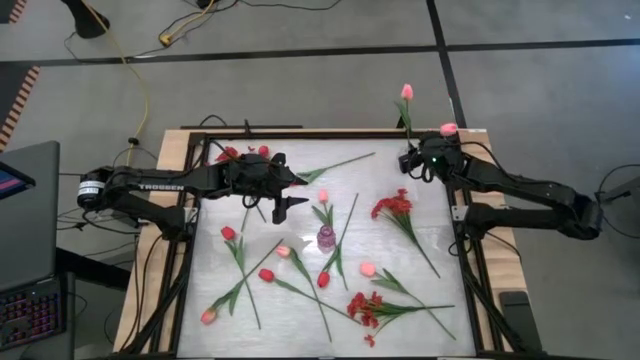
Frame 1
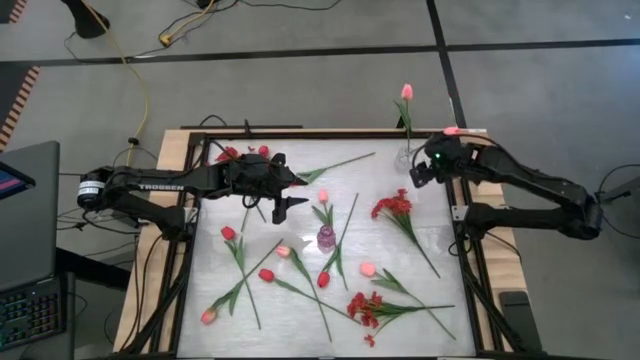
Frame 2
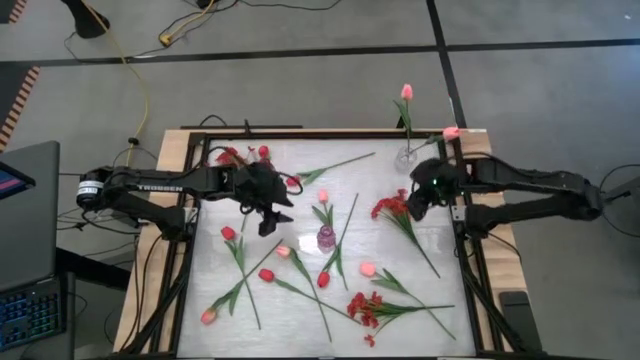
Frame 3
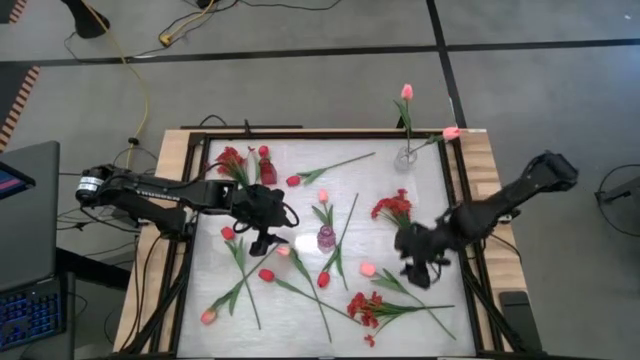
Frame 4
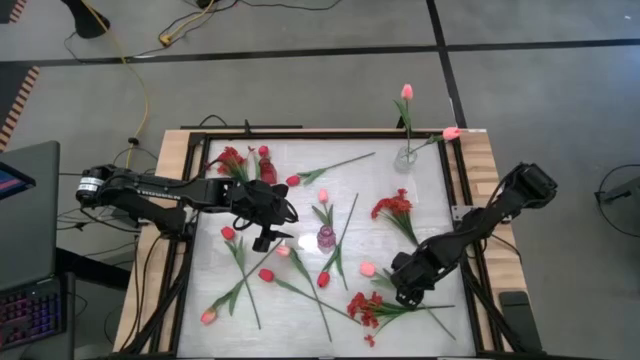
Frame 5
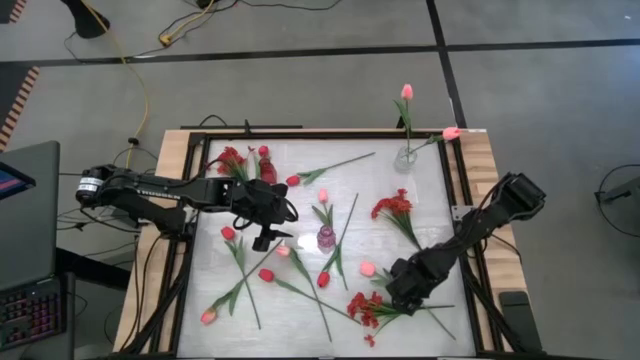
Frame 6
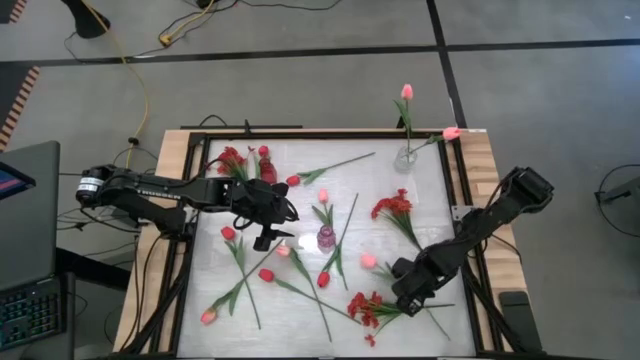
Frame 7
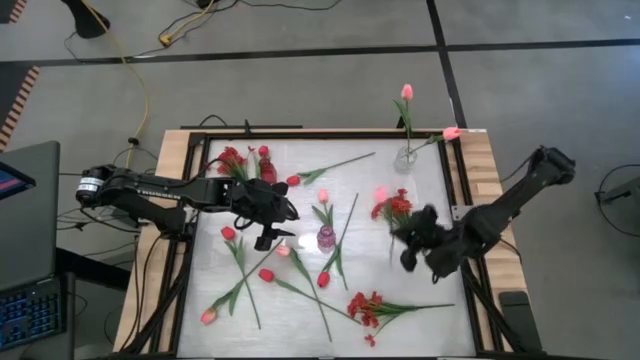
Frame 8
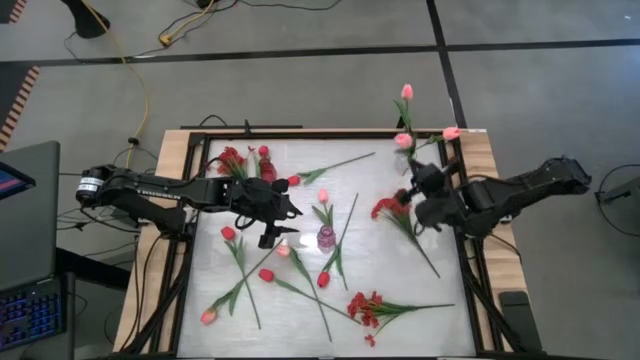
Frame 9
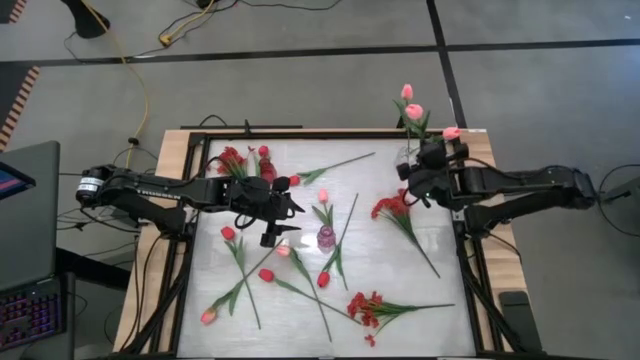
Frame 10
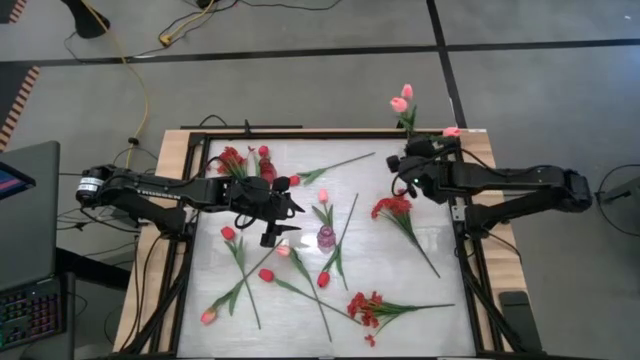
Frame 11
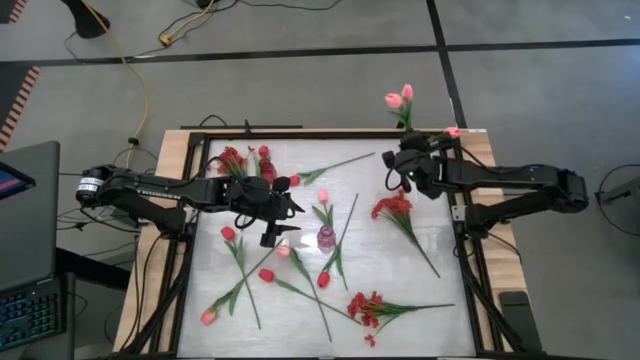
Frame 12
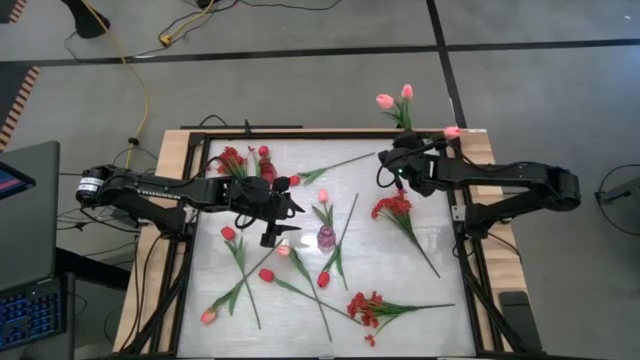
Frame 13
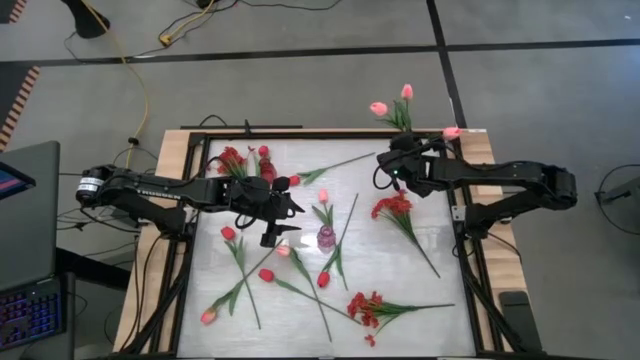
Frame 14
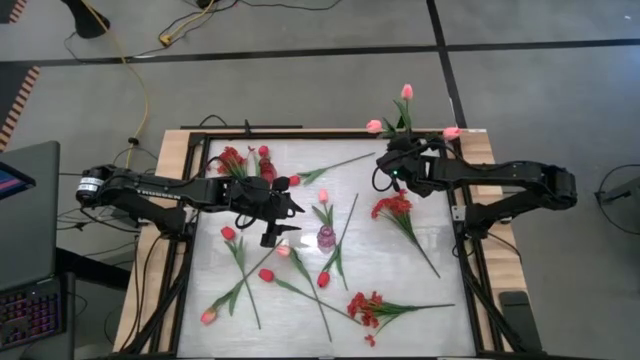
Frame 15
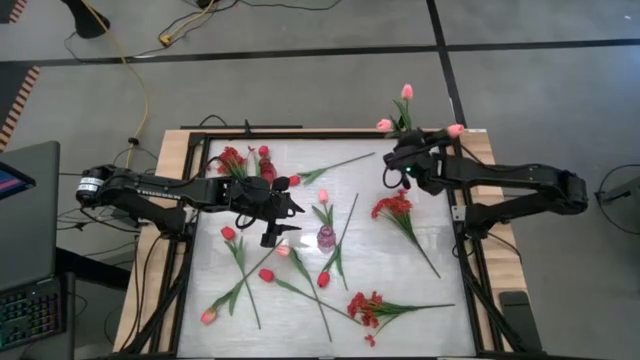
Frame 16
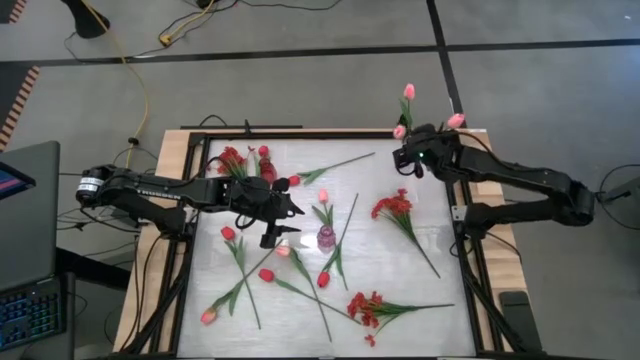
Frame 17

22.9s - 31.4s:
Task: Sort flowers into vase by color
Put the pink flower into the transparent vase

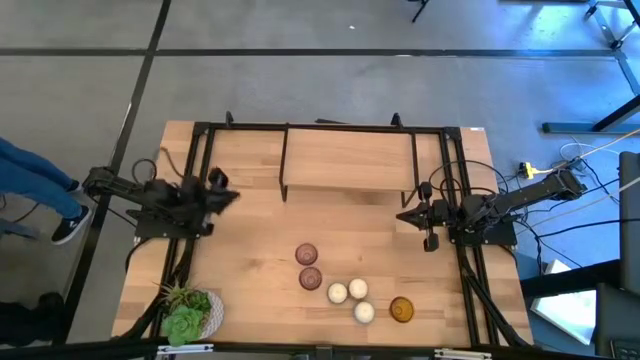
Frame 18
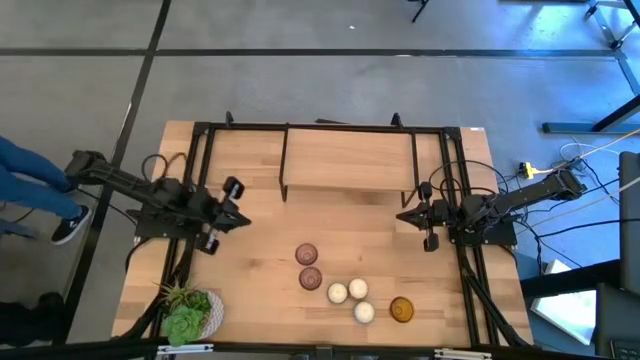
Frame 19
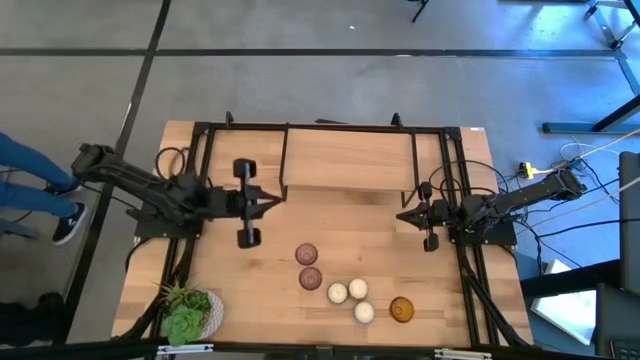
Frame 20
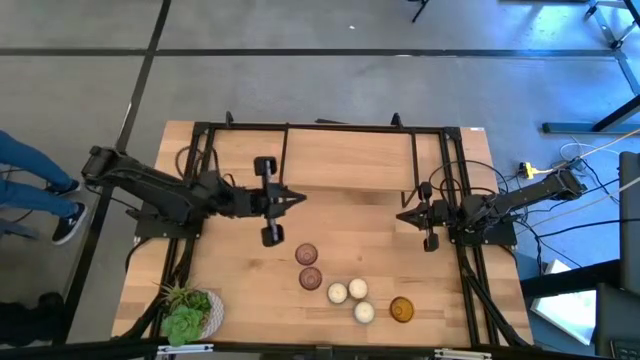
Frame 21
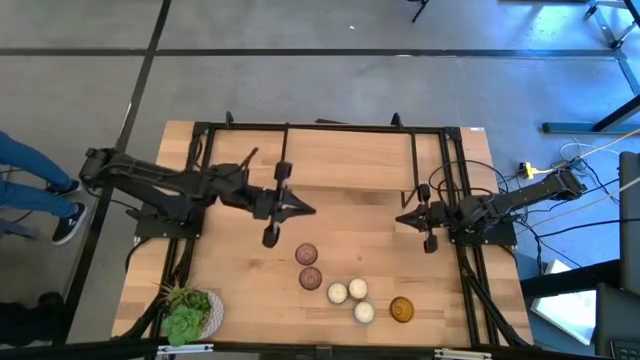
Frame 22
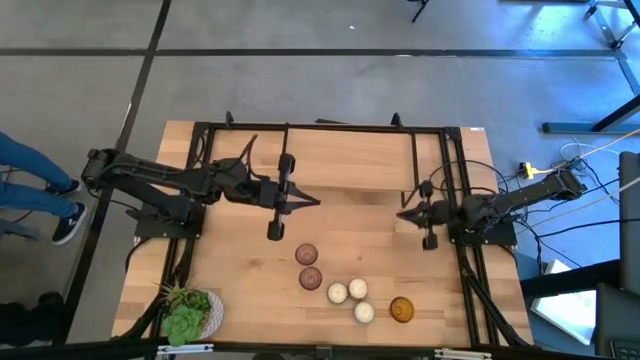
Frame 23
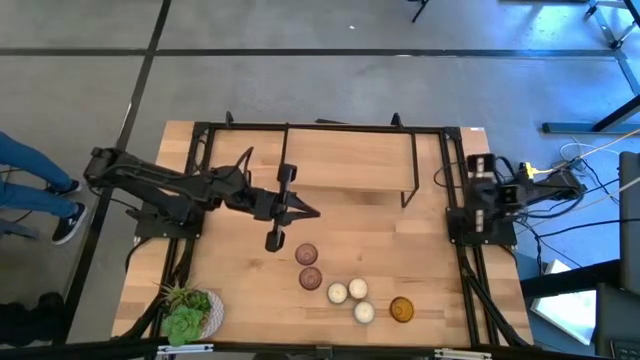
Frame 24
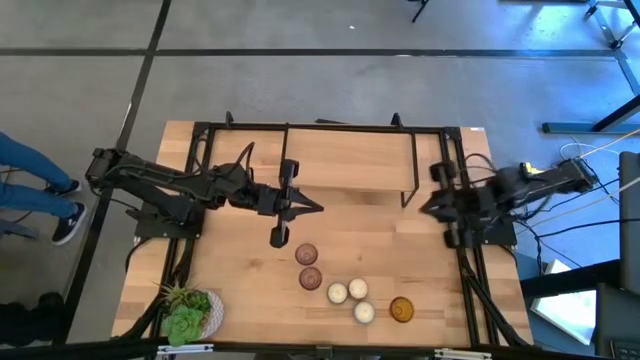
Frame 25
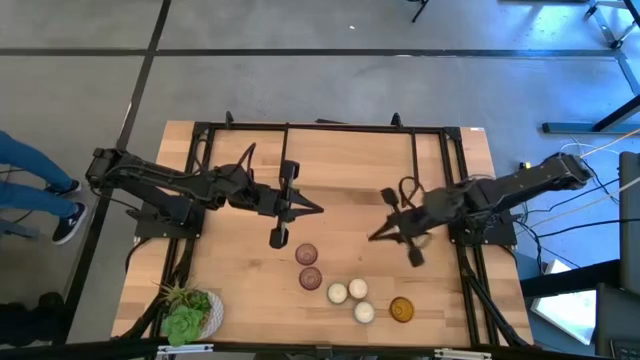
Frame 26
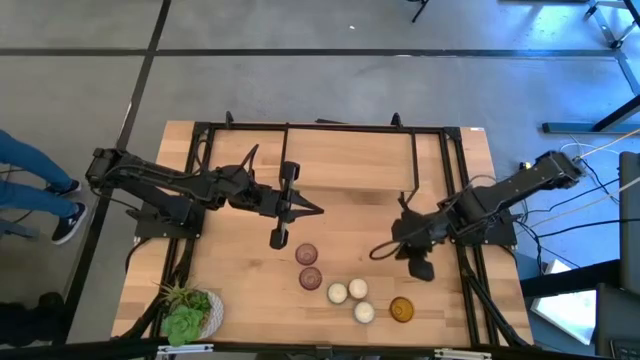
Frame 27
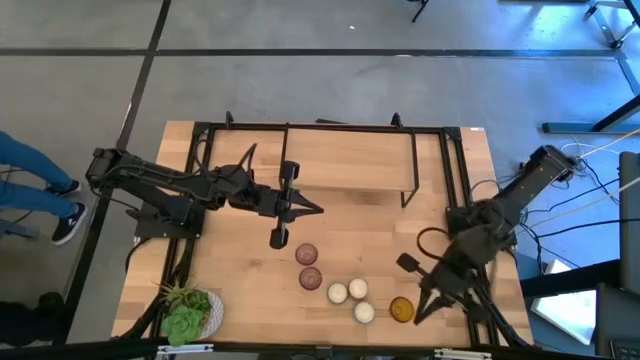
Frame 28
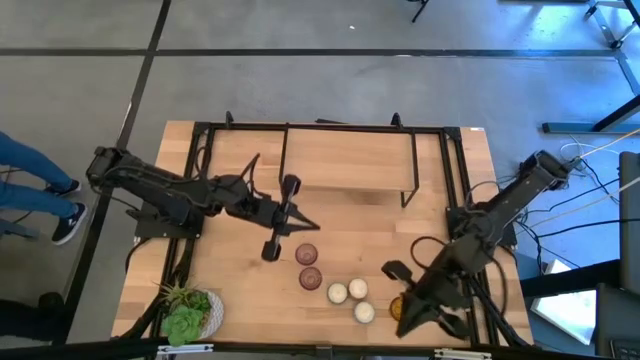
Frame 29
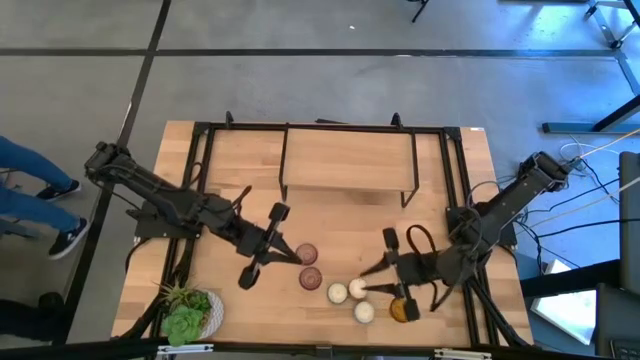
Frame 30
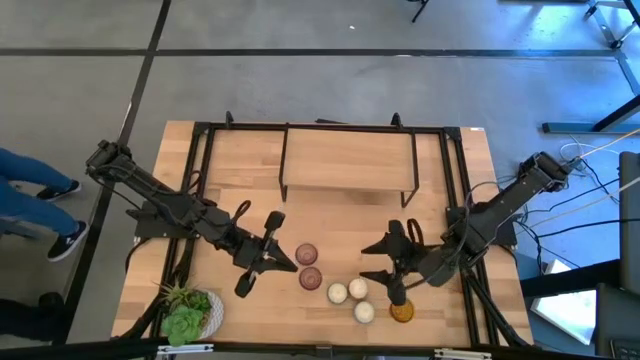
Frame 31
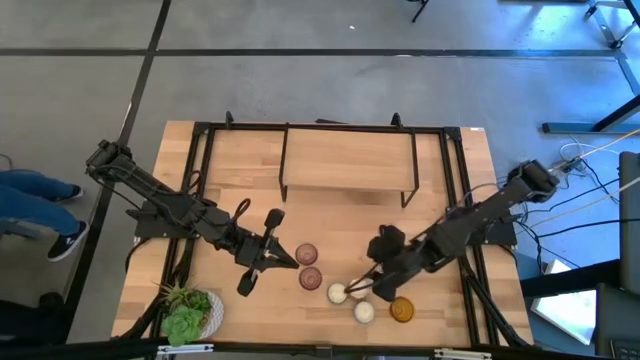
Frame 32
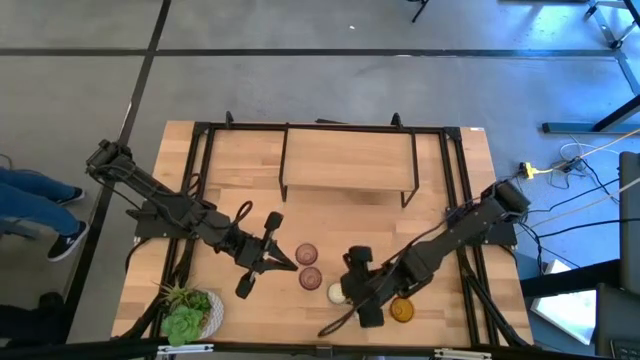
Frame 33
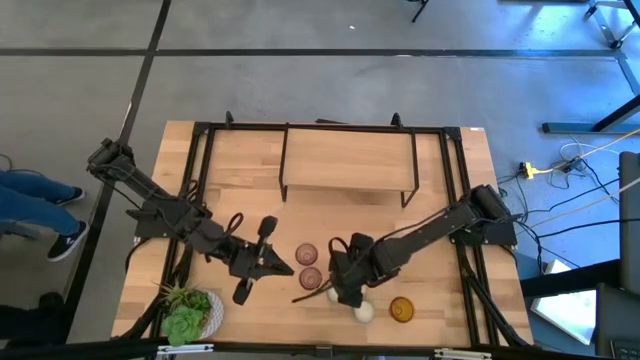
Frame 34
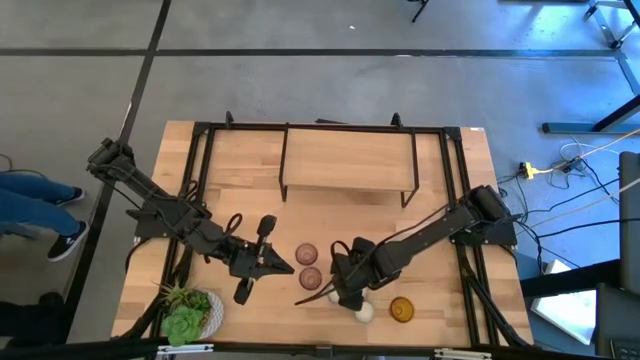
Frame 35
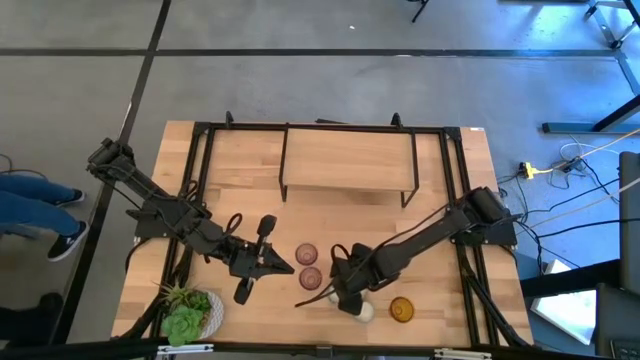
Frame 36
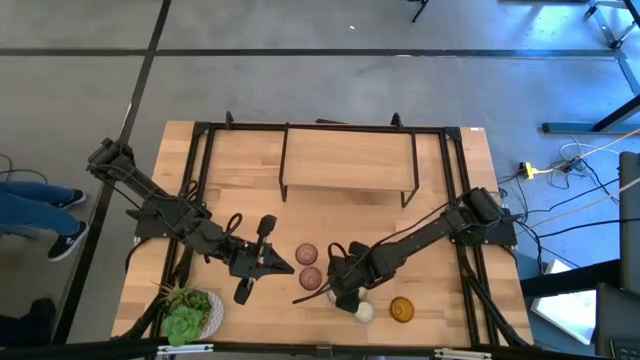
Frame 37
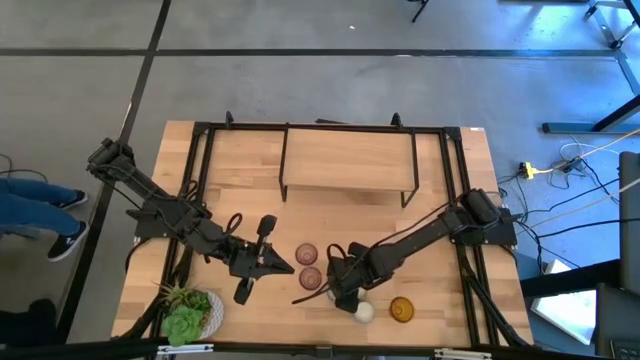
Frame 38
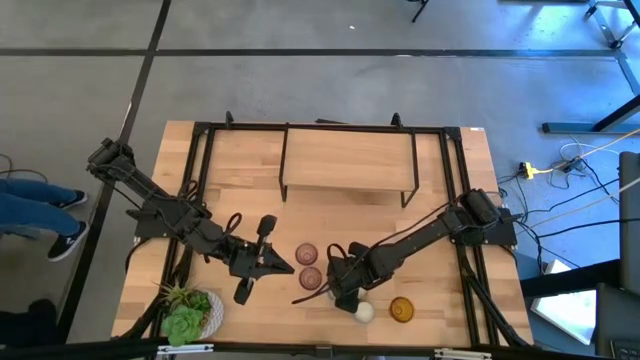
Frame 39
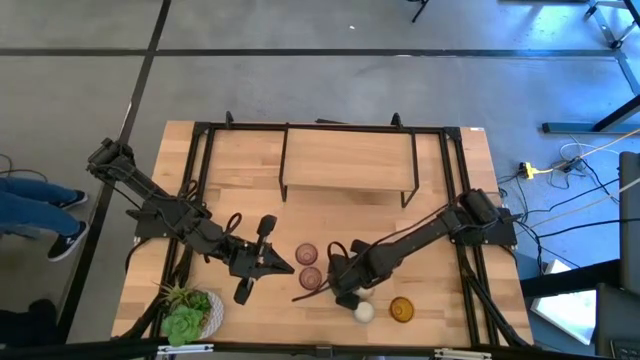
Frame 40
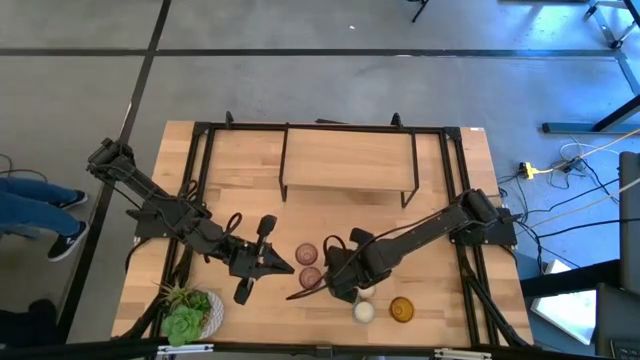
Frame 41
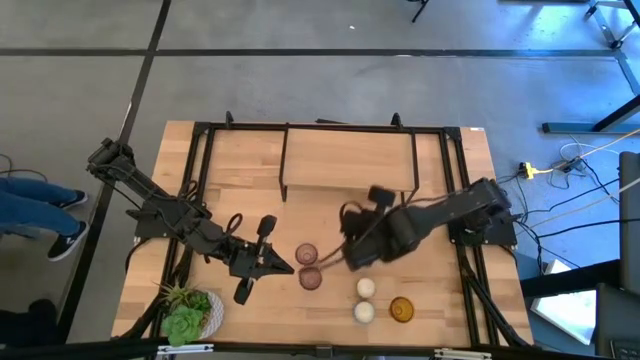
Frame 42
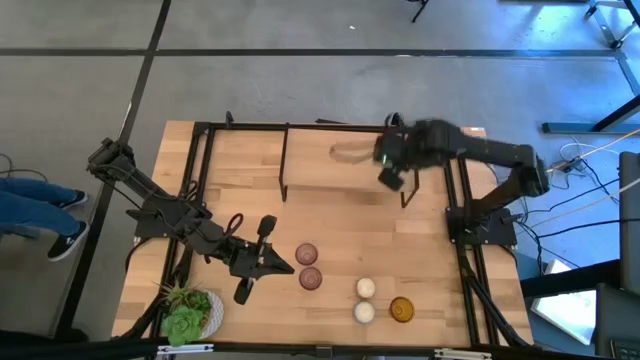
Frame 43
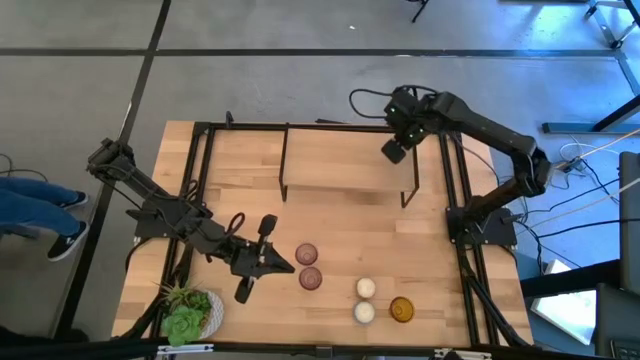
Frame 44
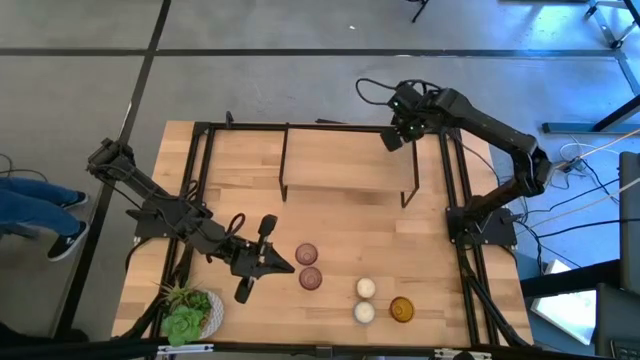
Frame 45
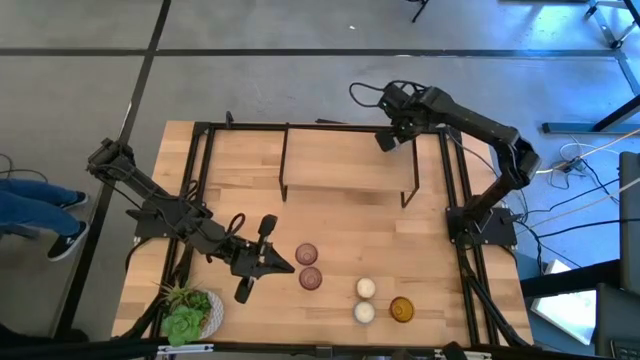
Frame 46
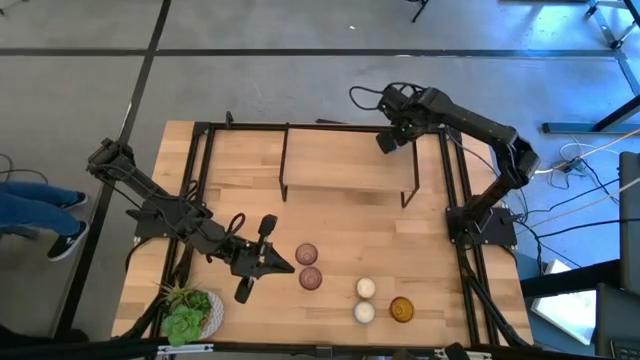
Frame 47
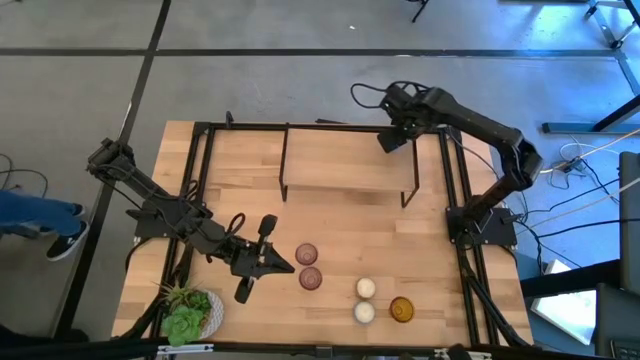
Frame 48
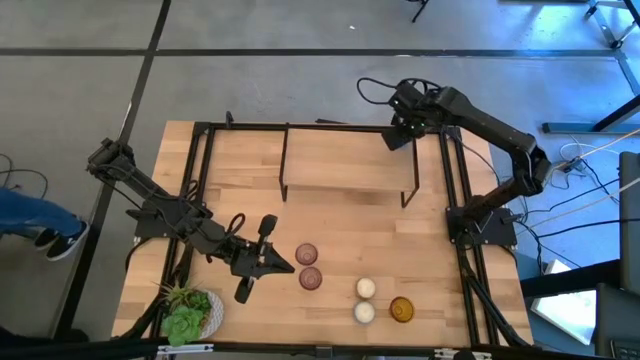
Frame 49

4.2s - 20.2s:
Task: Pick & Place candle stick holders
Put the blue candle on the shelf
